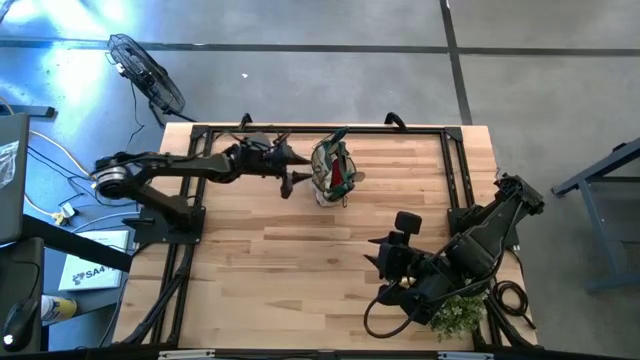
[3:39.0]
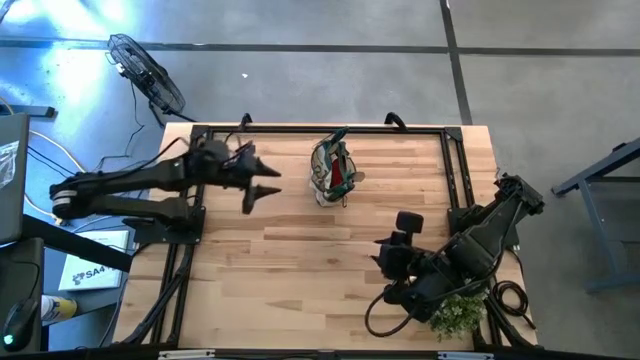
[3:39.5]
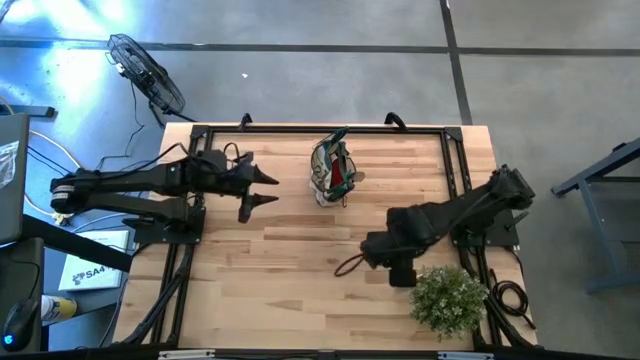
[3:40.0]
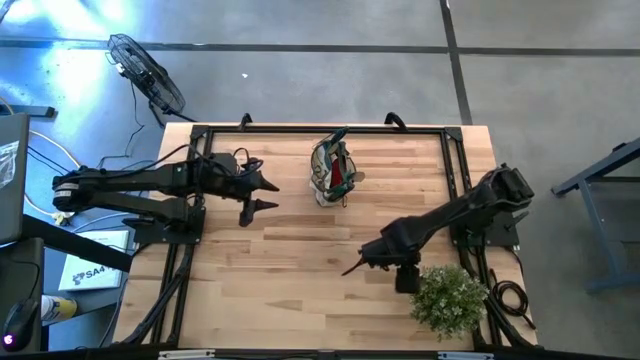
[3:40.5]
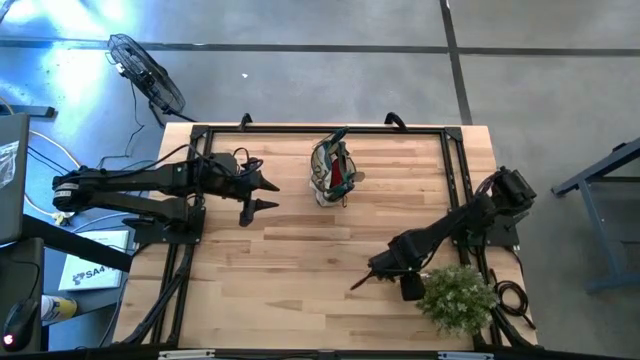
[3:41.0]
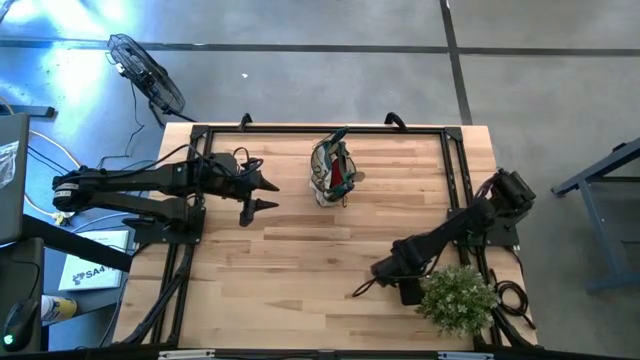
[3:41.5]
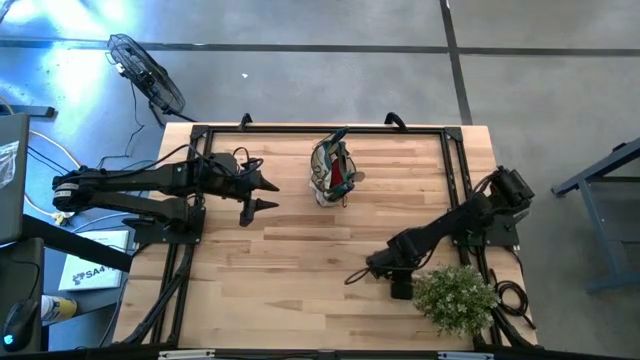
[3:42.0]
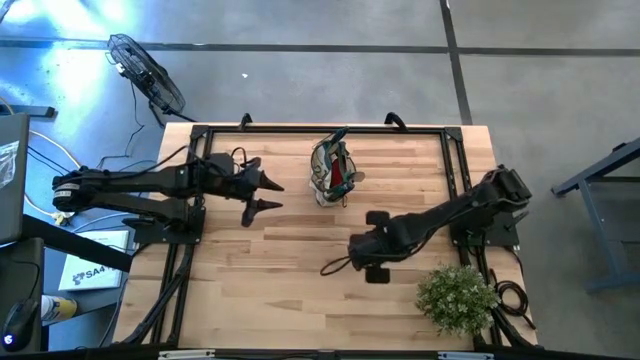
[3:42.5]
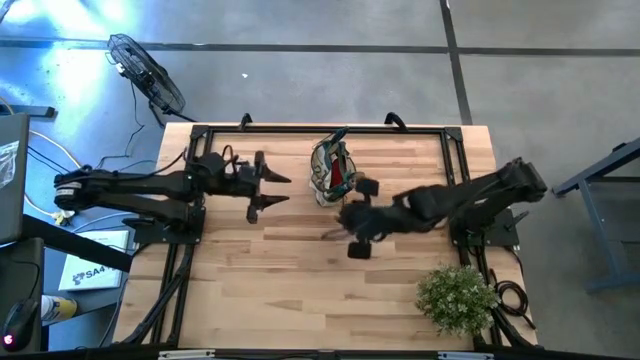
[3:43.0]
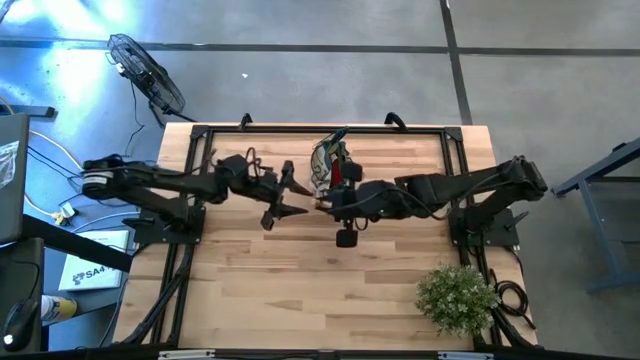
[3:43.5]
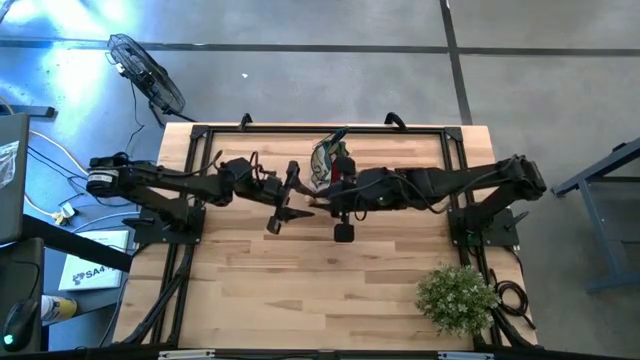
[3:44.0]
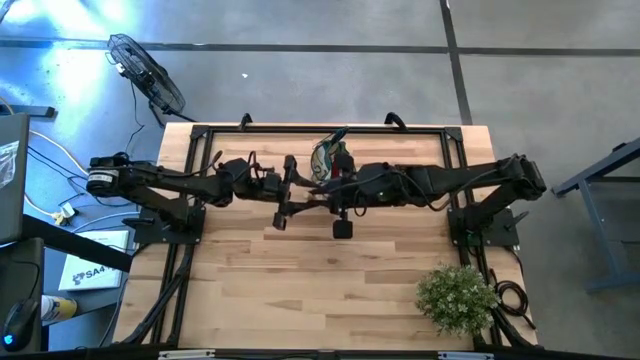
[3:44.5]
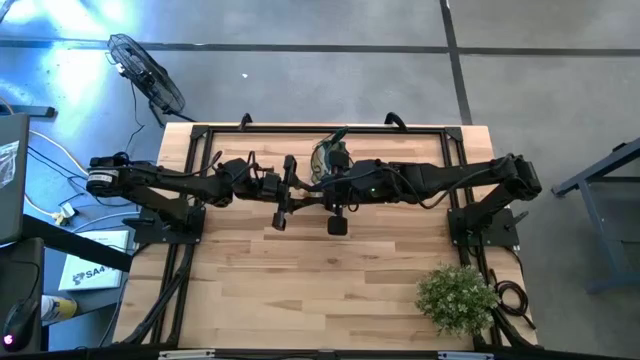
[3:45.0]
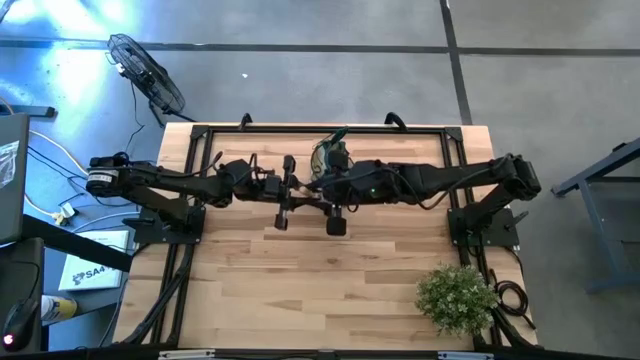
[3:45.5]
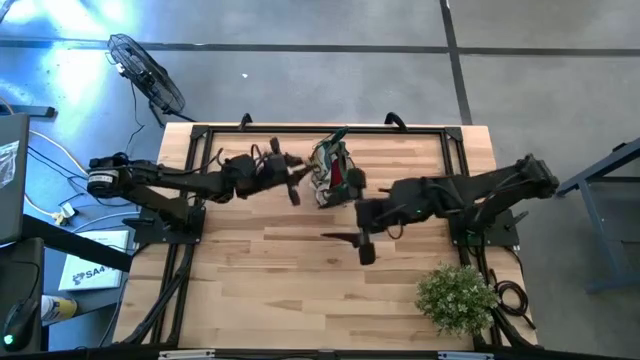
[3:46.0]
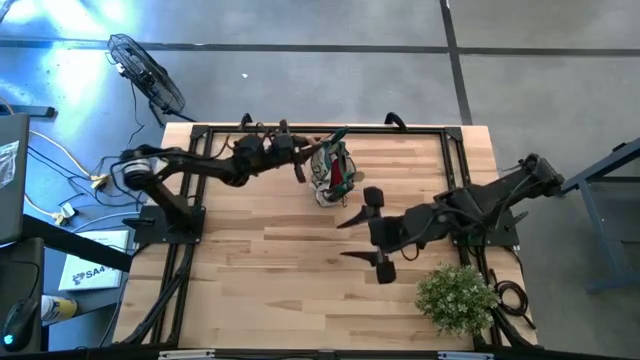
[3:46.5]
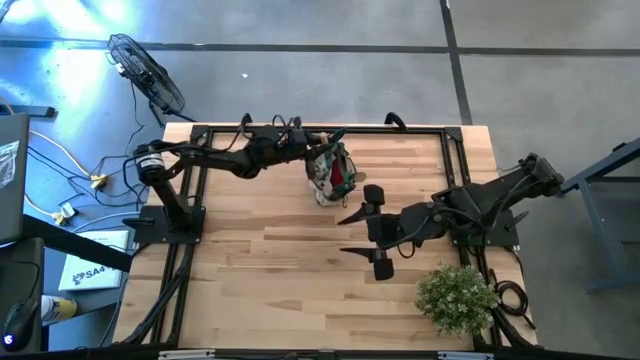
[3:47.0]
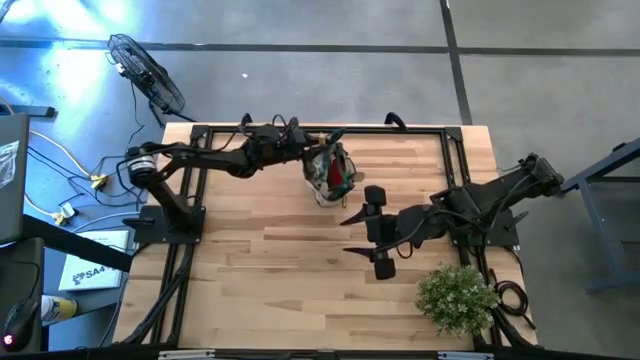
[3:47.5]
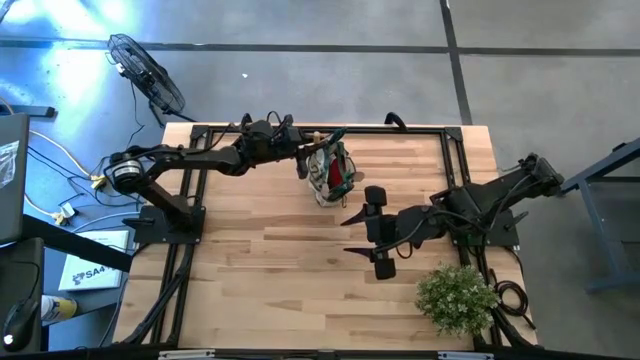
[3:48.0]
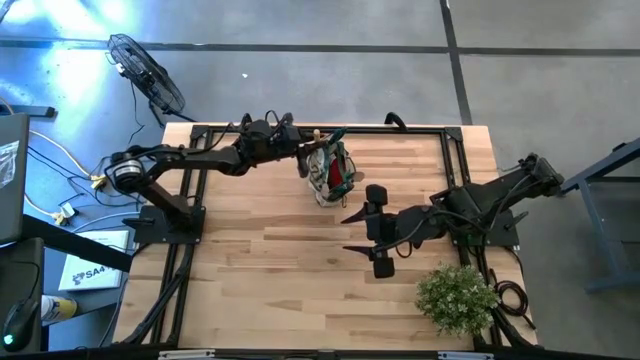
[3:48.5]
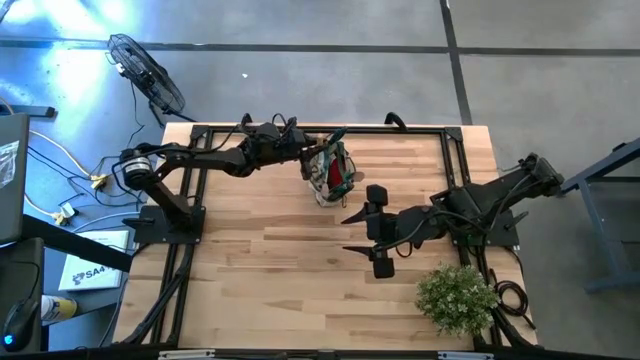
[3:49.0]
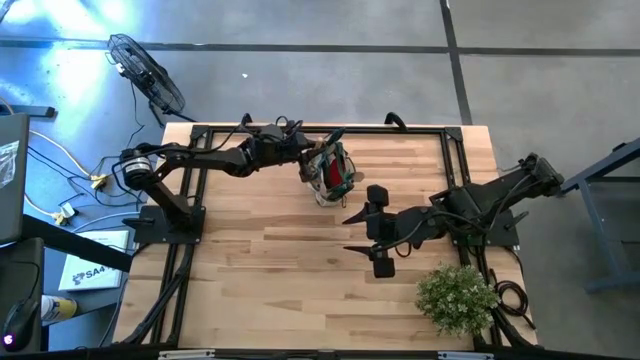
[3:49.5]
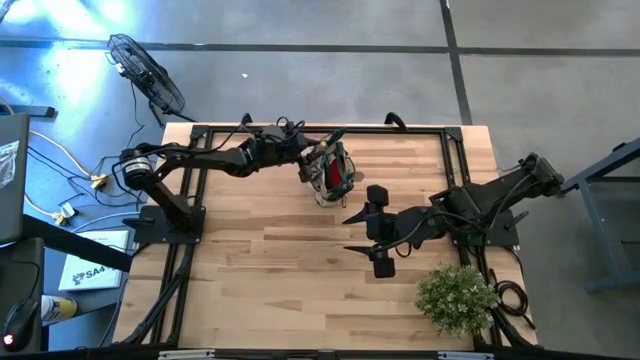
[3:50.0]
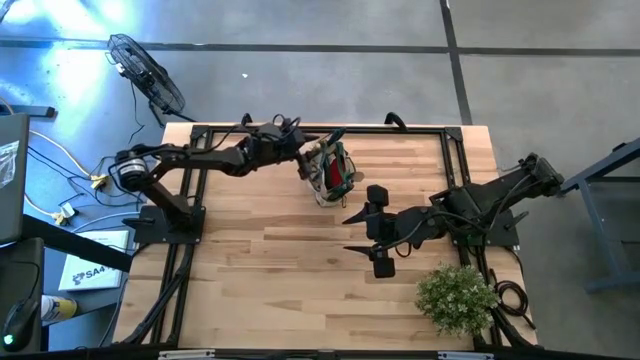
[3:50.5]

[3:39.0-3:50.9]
Task: Pick & Place Garden tools in Gardening bag
Put the brown trowel into the light brown gardening bag

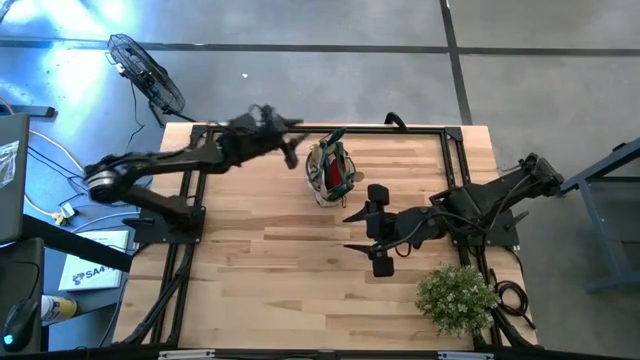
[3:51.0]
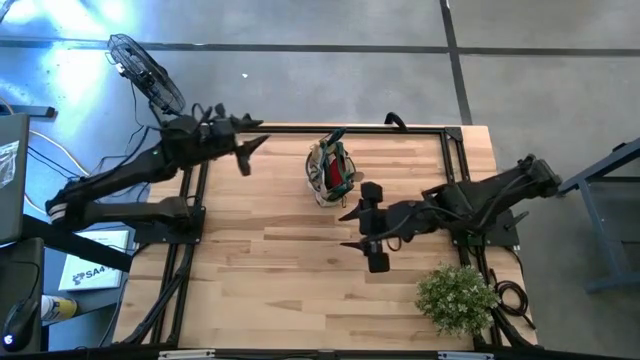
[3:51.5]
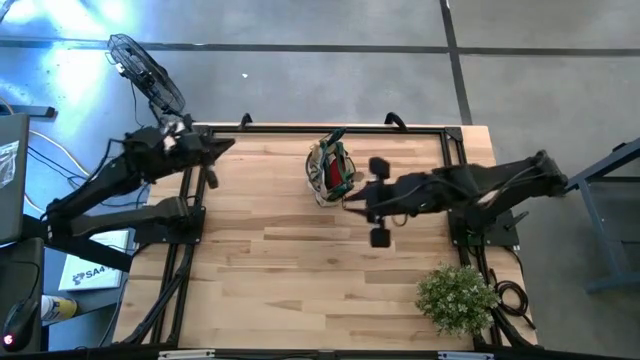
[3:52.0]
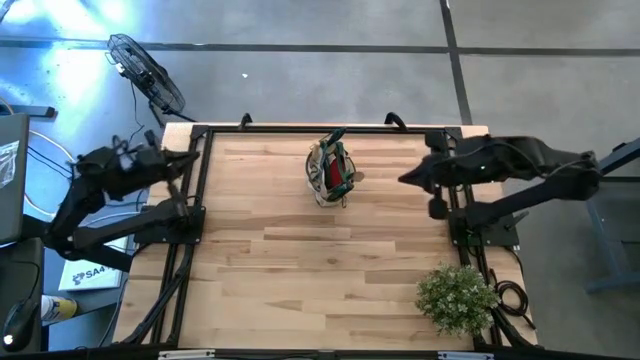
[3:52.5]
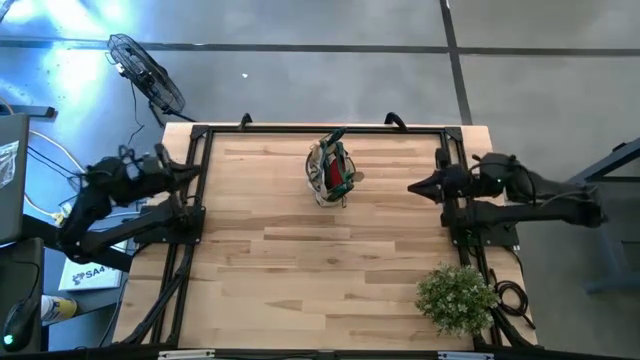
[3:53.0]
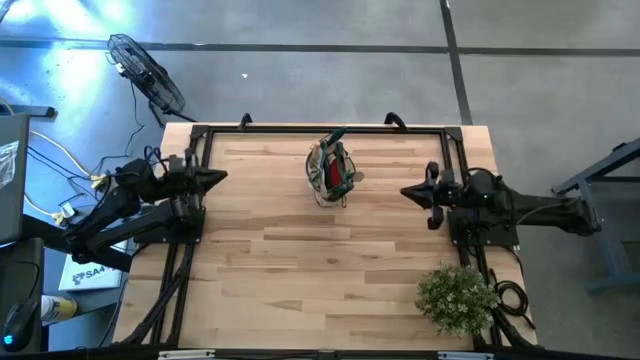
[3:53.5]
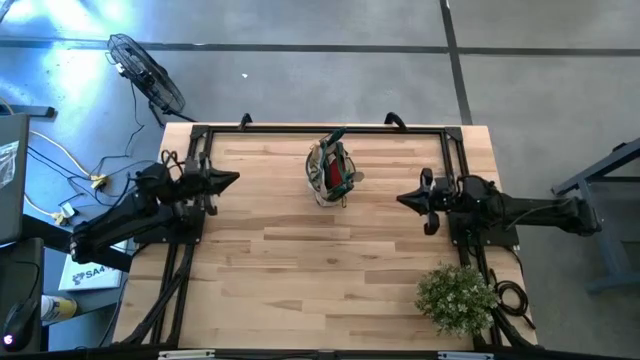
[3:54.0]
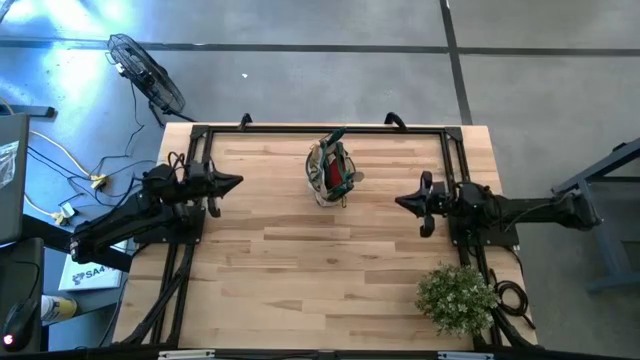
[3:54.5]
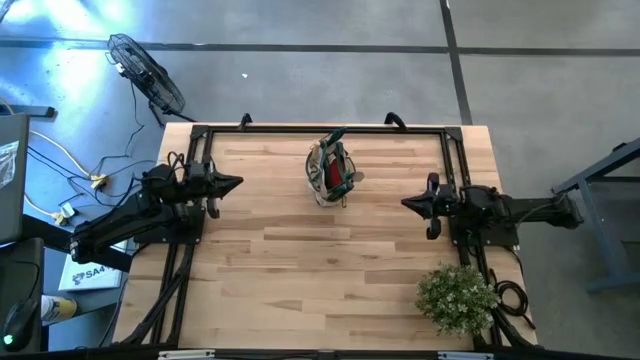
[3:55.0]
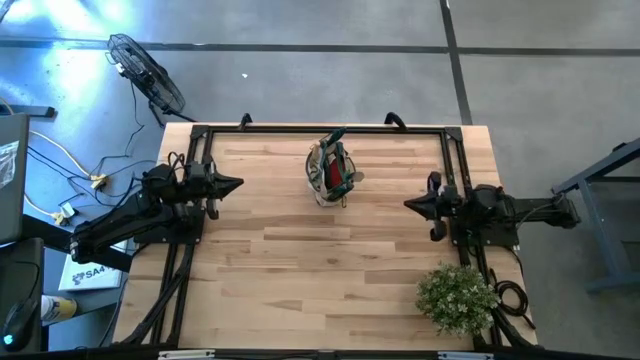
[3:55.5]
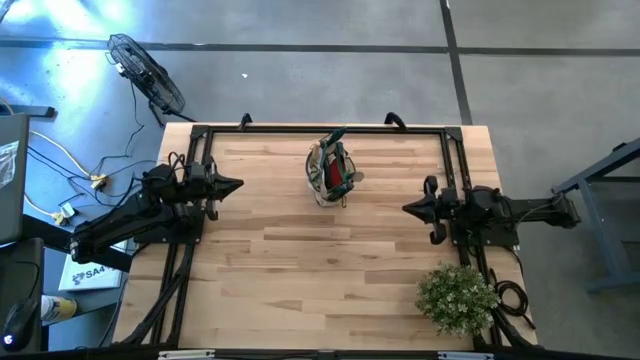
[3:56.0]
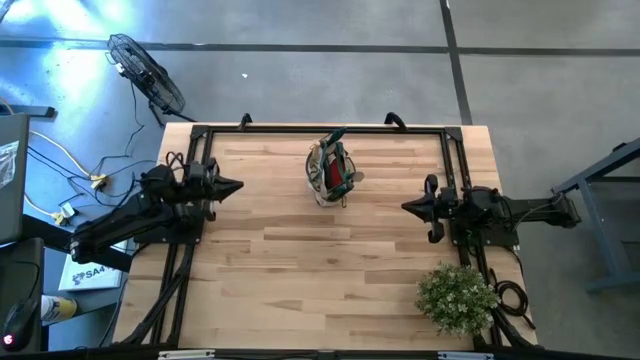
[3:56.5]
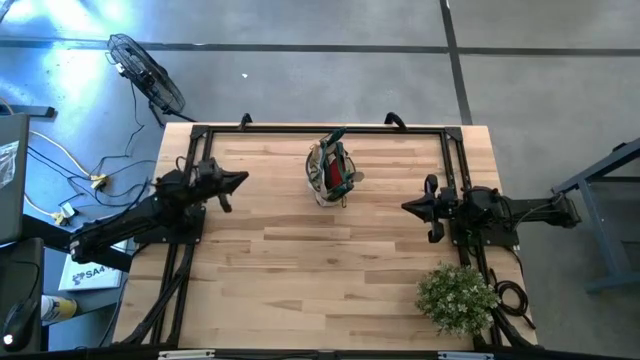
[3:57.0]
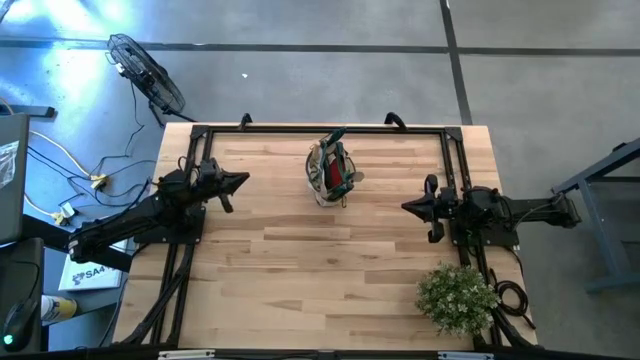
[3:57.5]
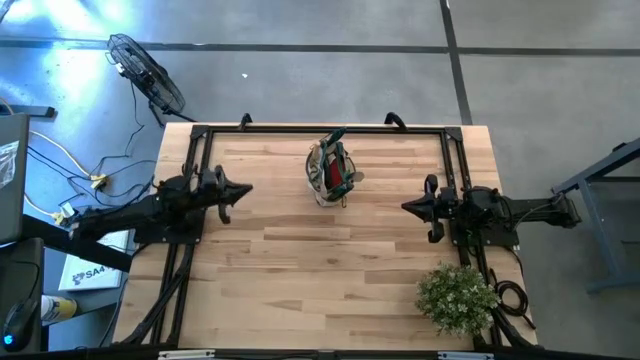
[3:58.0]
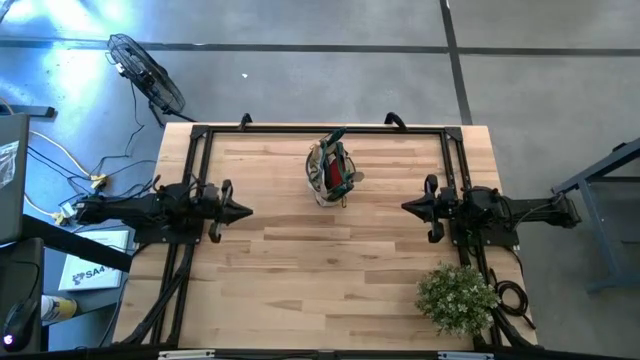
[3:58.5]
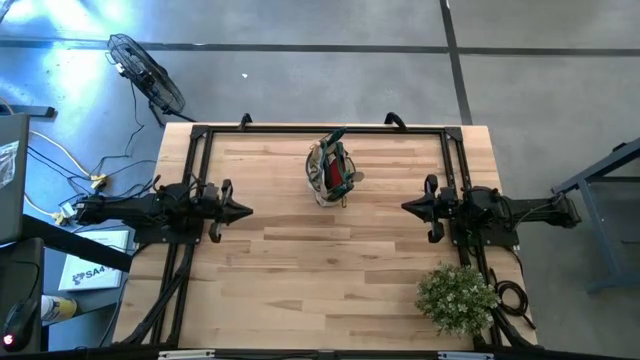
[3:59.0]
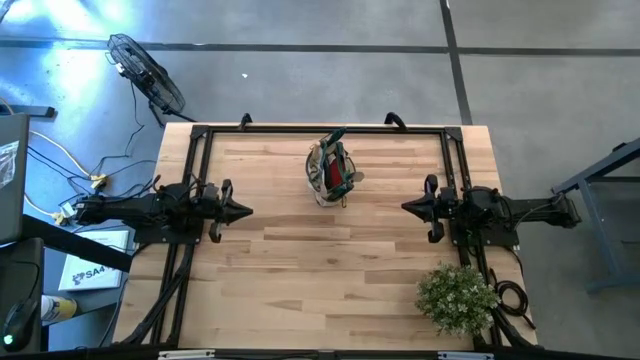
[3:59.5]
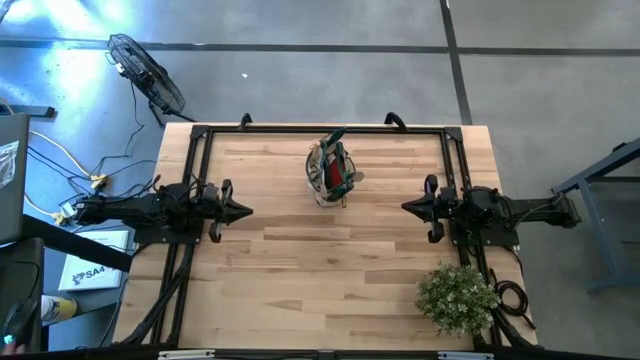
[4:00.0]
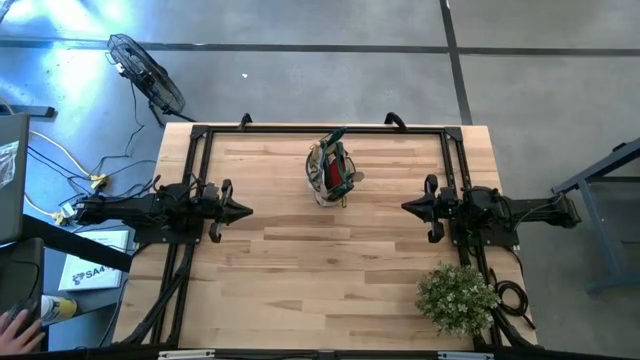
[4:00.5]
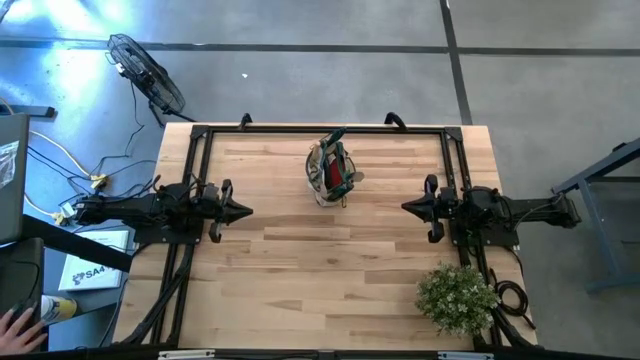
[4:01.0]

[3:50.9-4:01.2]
Return to Home Position
